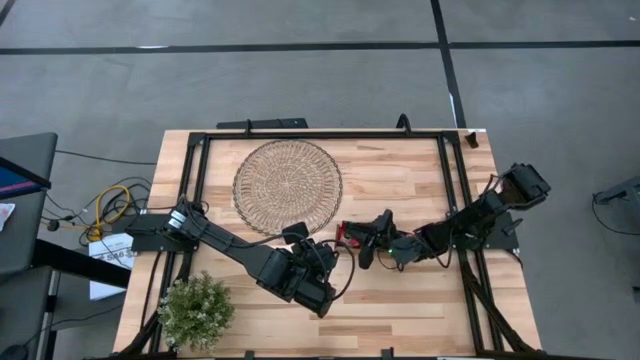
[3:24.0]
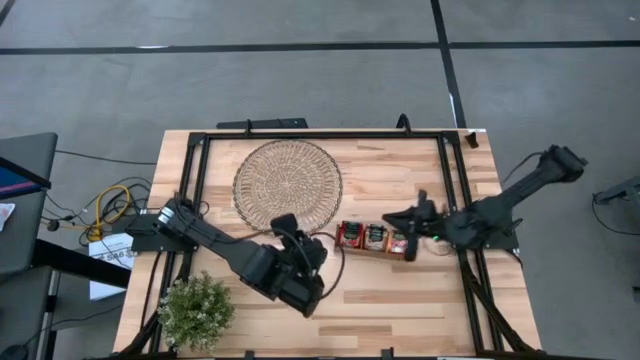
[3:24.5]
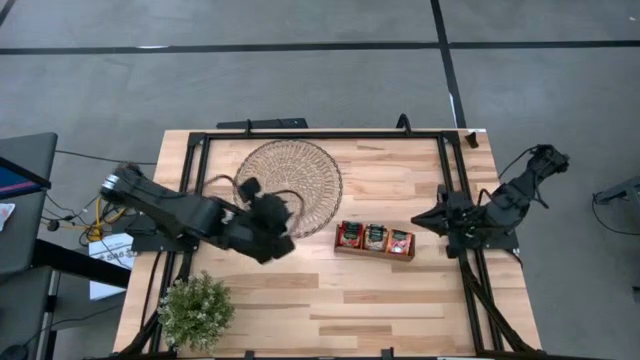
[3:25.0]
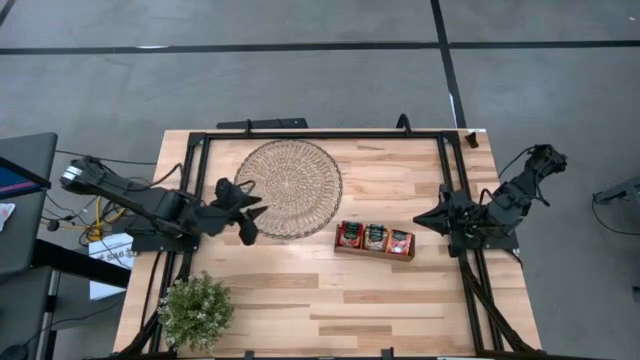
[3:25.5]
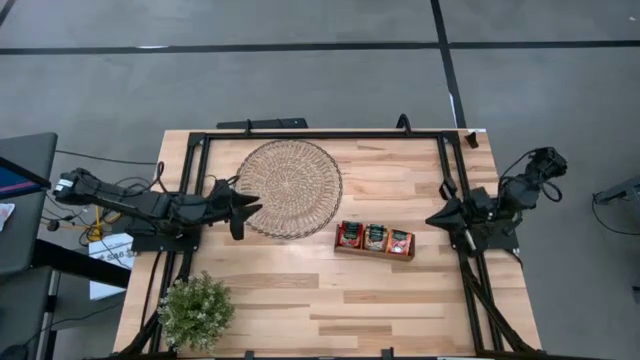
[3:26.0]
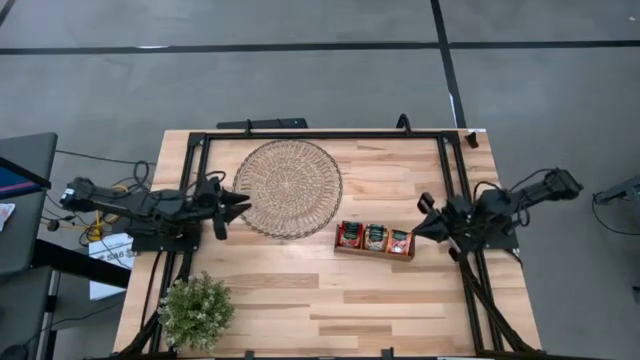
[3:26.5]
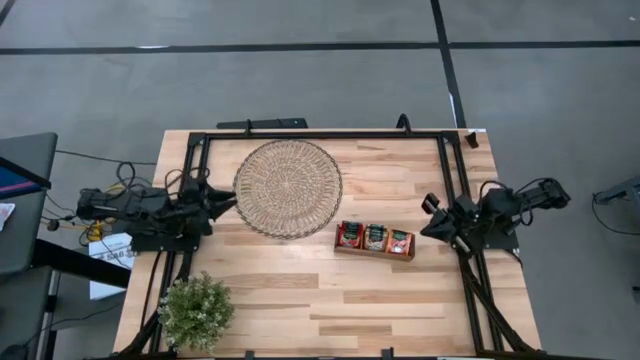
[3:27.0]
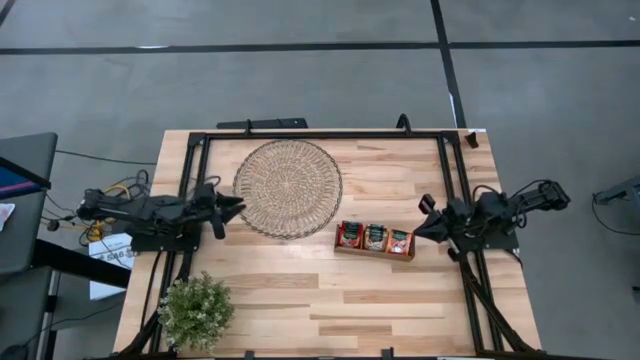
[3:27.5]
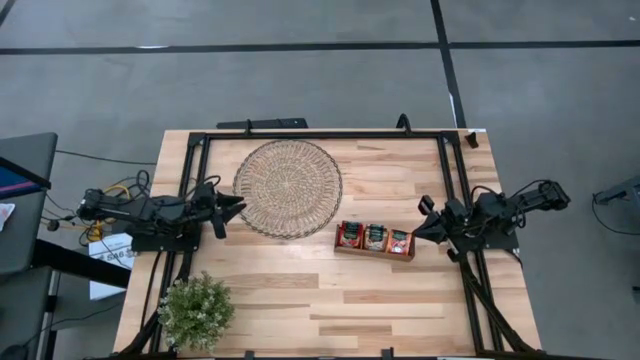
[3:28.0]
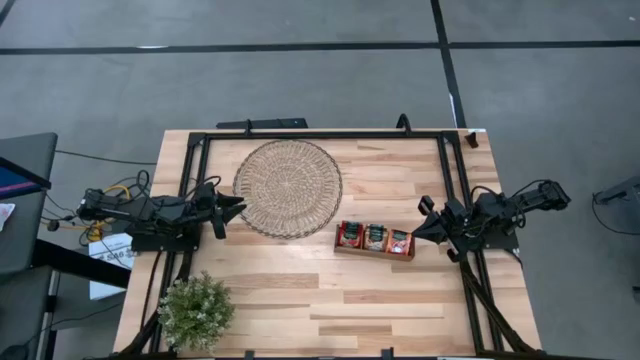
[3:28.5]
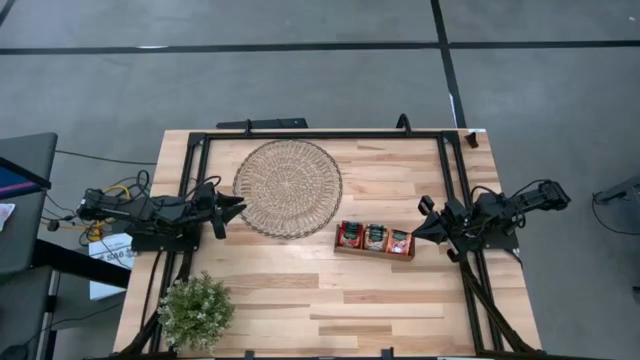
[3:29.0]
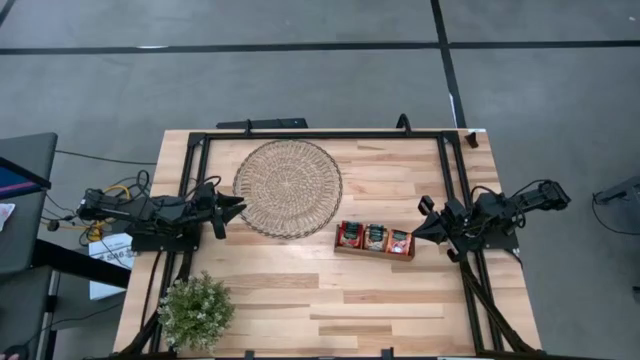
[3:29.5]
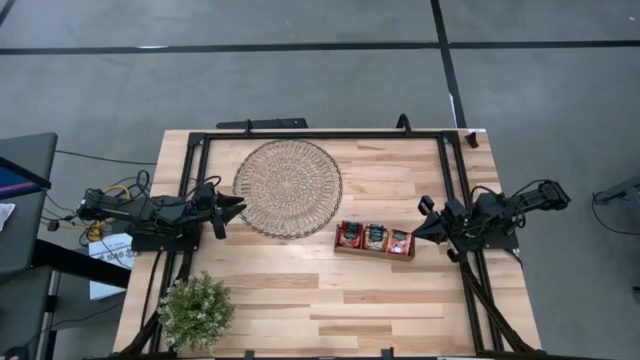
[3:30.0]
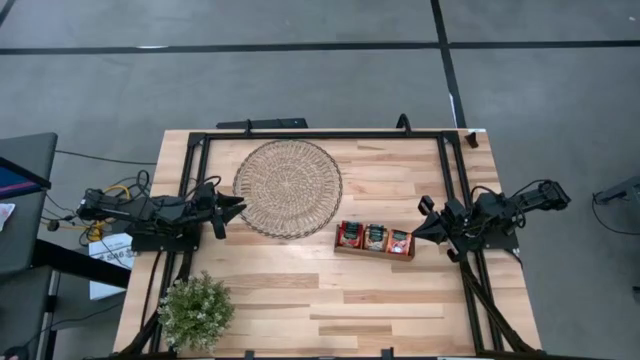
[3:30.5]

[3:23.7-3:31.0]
Task: Pick & Place Tea
Return to Home Position
